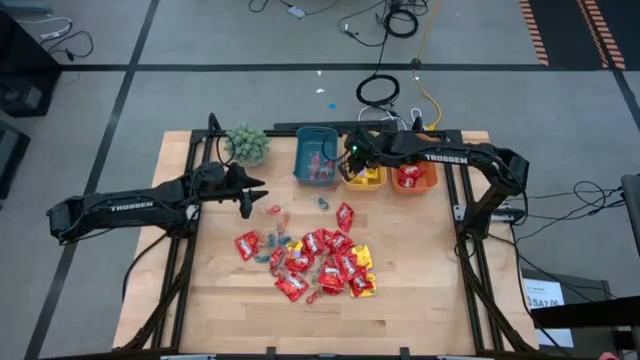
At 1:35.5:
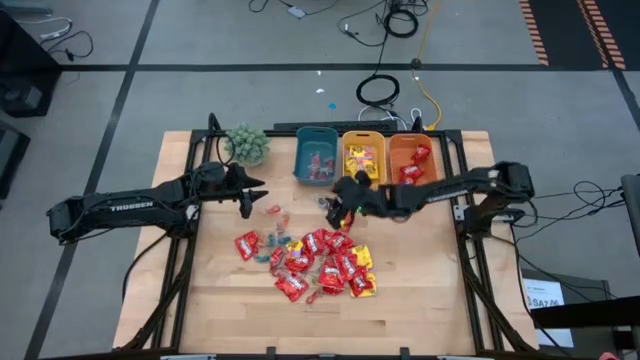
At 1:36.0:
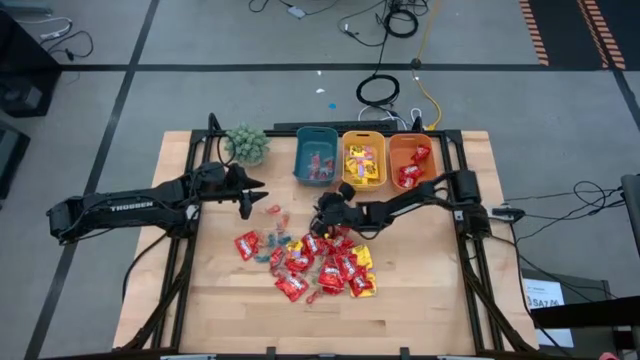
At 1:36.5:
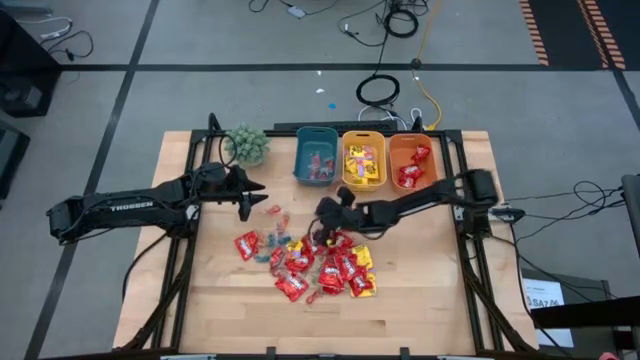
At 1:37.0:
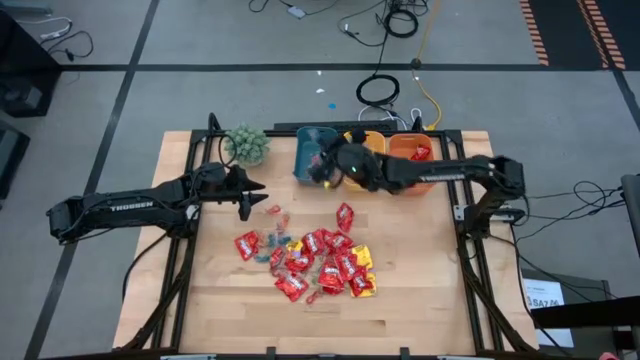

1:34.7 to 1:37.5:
Task: Sort candy
Put the blue gummy into the blue bin

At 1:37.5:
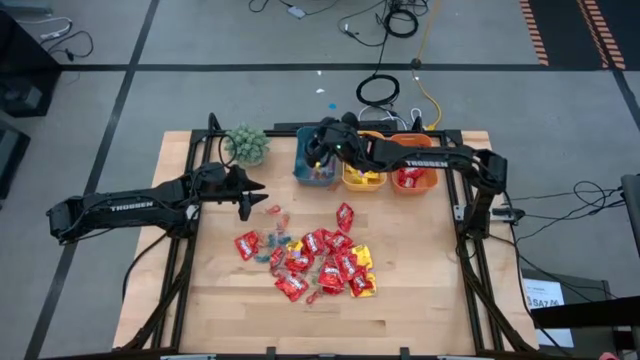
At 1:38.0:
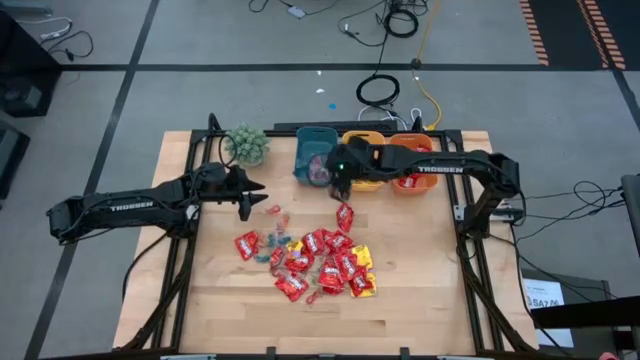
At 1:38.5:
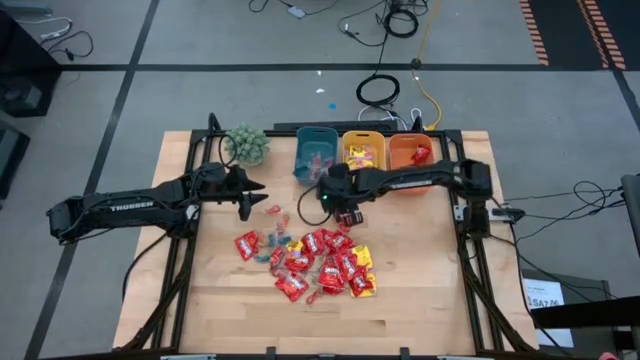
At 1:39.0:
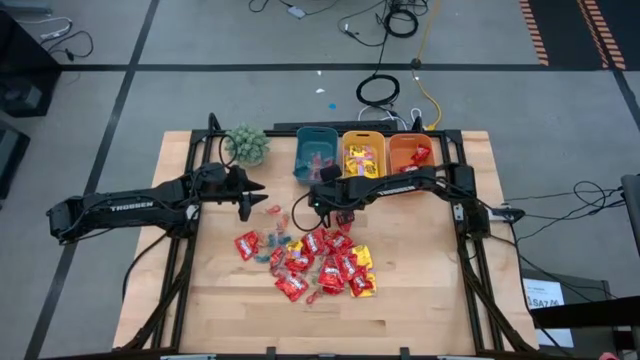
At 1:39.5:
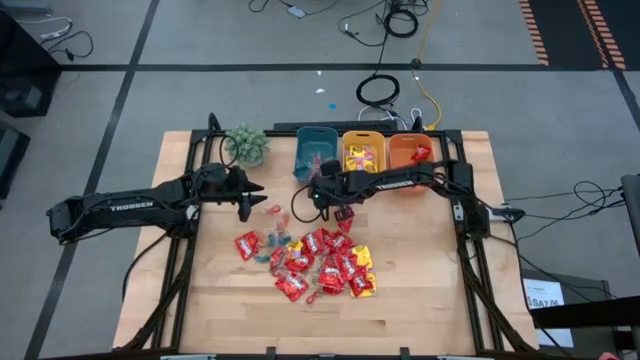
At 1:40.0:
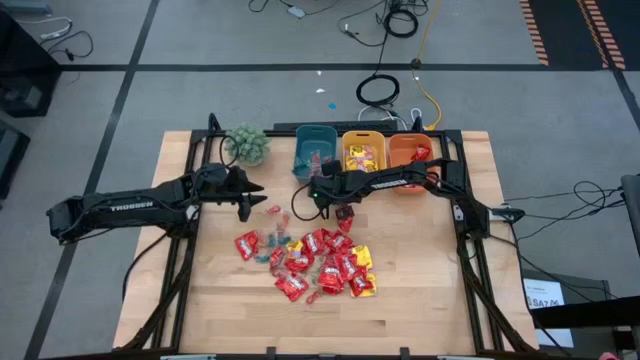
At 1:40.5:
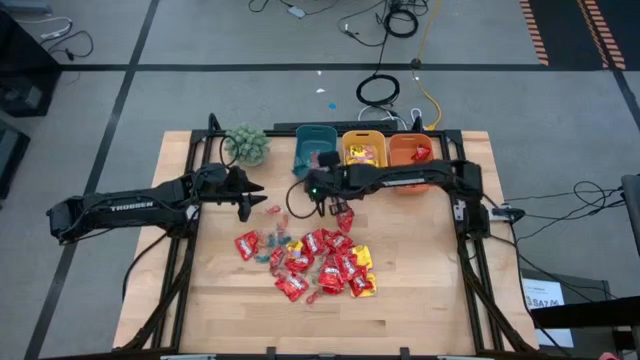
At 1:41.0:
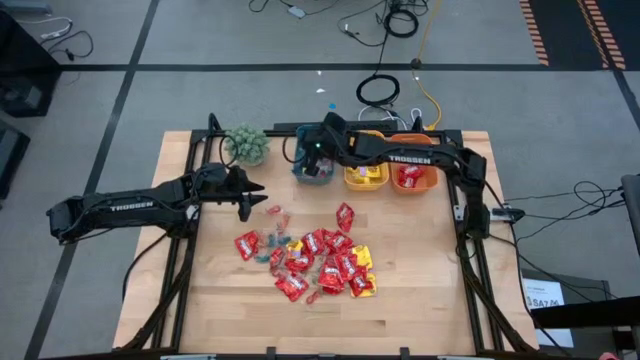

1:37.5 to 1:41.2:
Put the orange gummy into the blue bin

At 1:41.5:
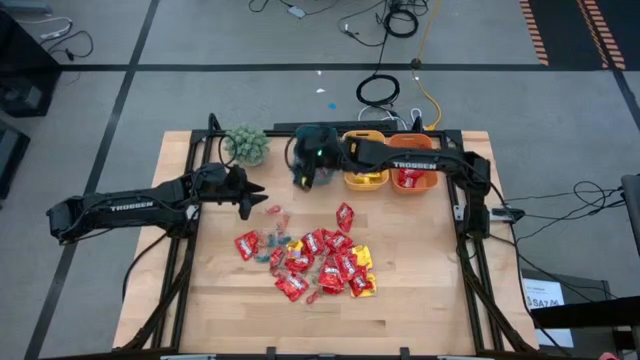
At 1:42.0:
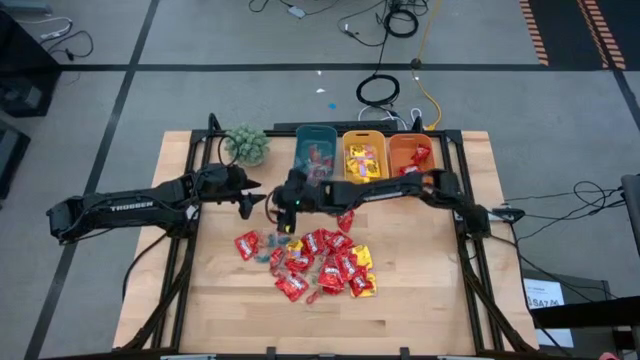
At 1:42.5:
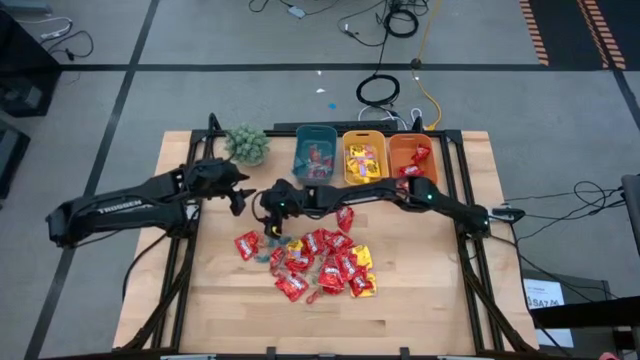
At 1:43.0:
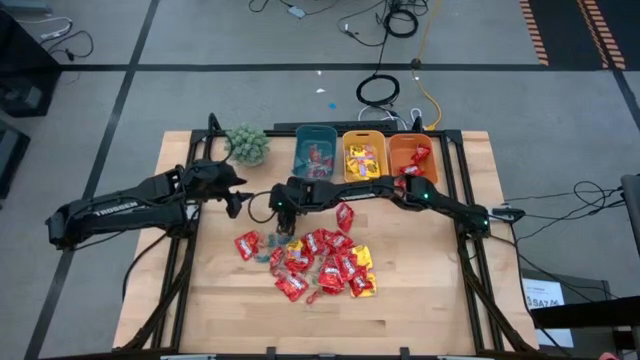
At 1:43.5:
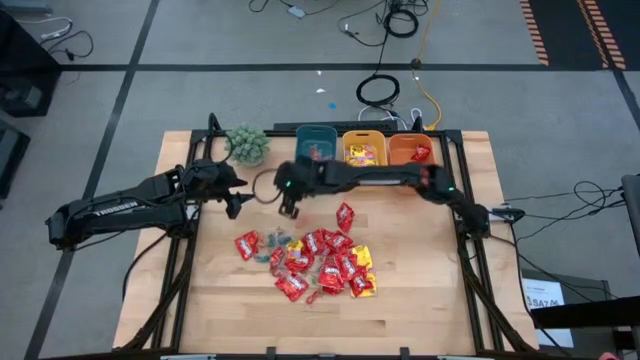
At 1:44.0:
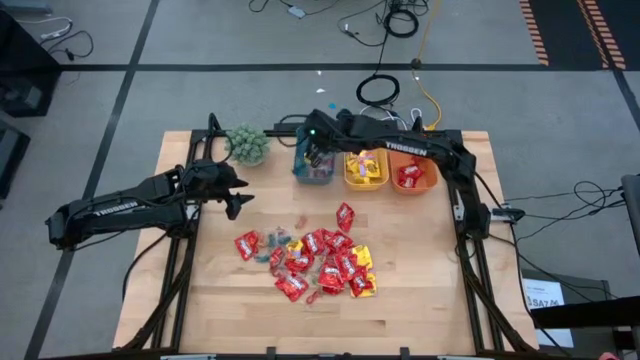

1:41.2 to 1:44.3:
Put the orange gummy into the blue bin

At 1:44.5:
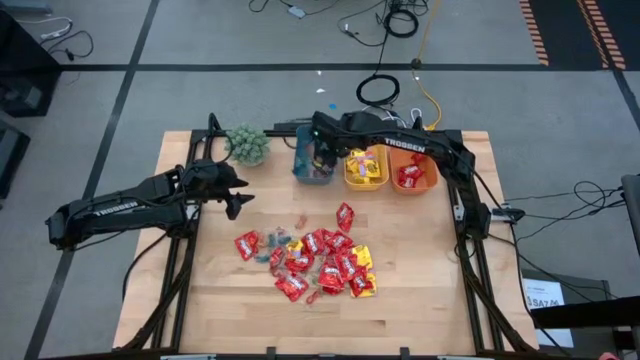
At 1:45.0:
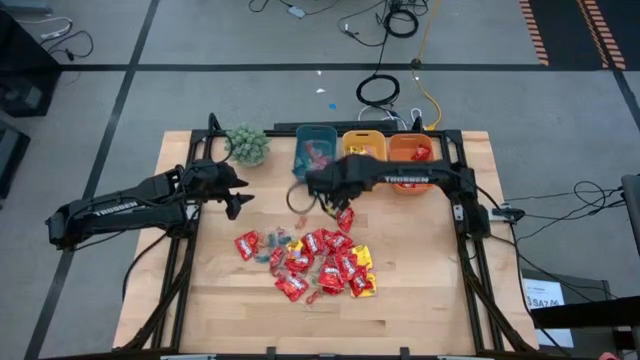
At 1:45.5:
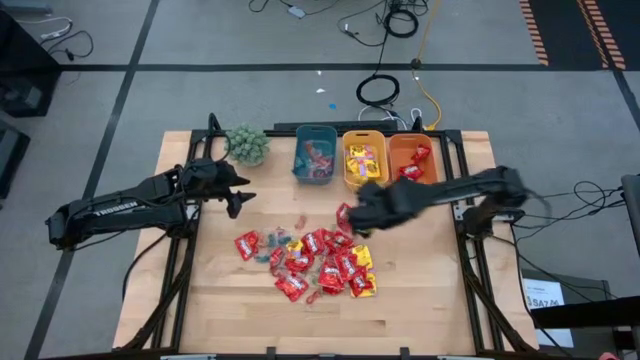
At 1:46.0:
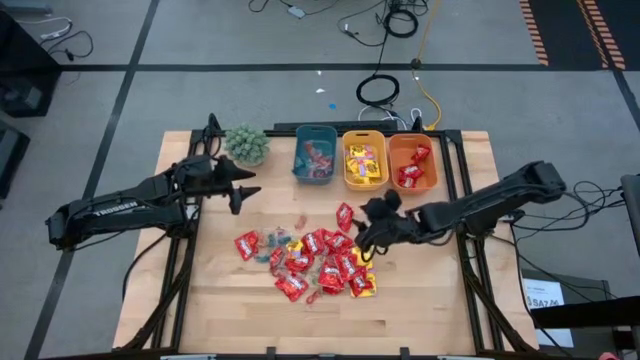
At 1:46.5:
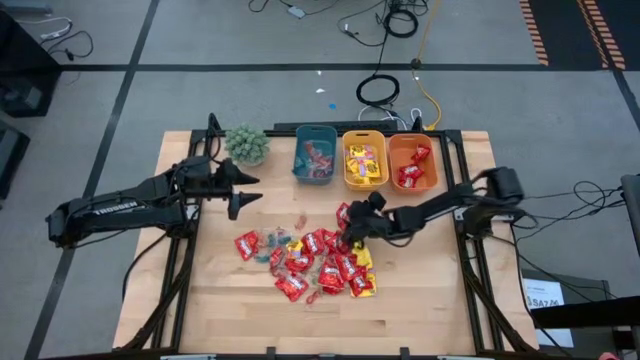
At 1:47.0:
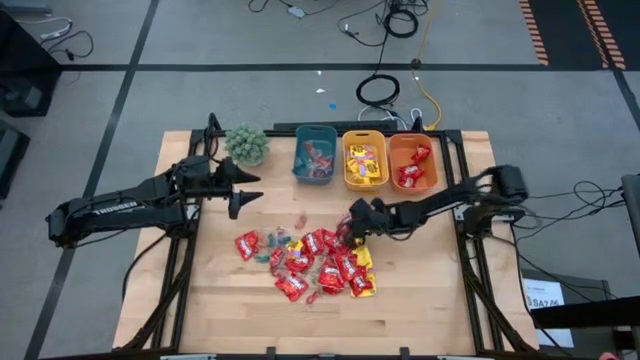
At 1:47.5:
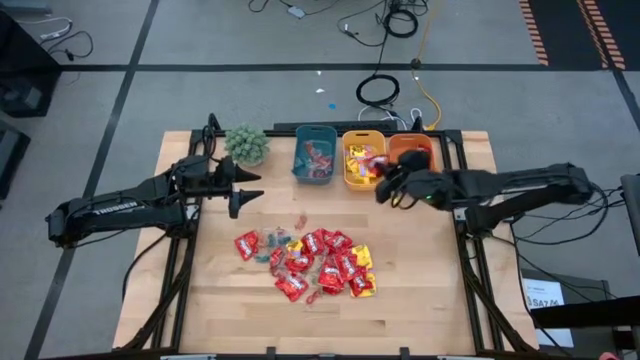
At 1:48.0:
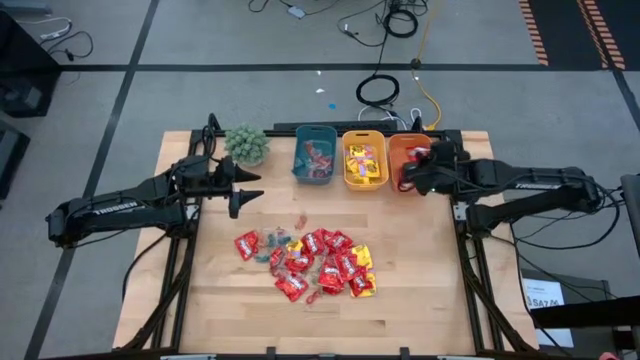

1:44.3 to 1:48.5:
Put the red candy into the orange bin

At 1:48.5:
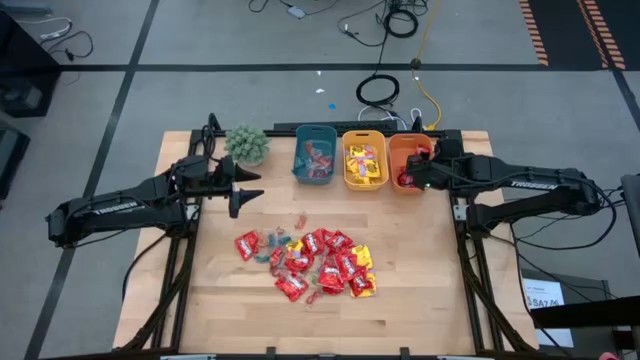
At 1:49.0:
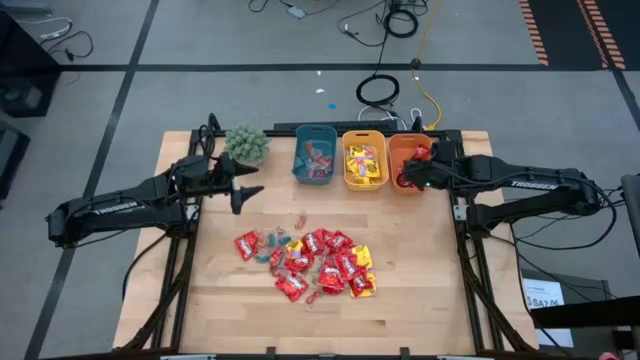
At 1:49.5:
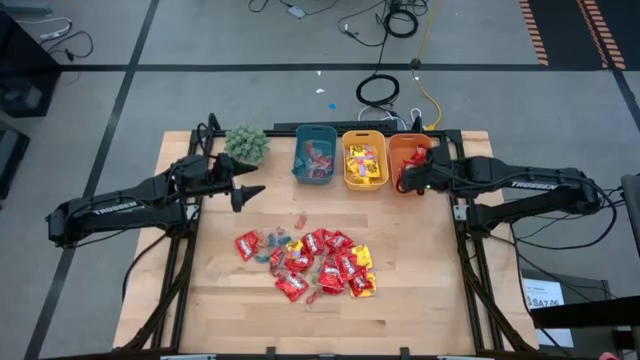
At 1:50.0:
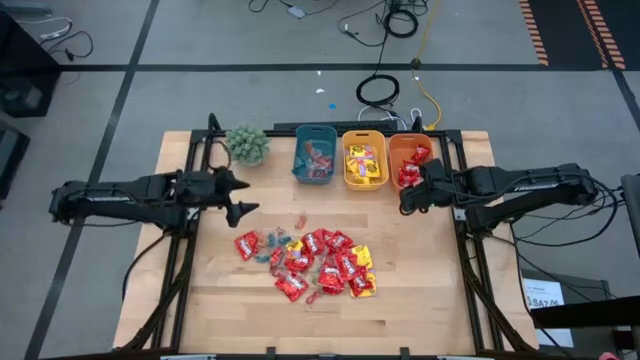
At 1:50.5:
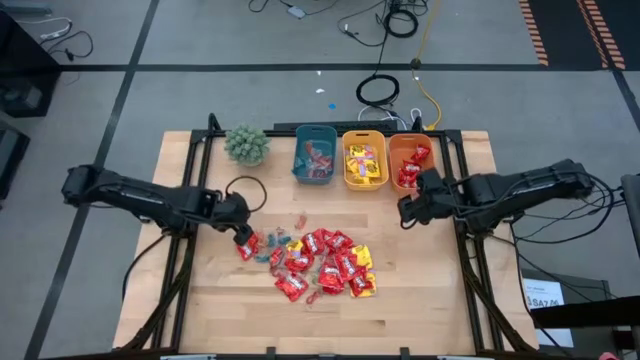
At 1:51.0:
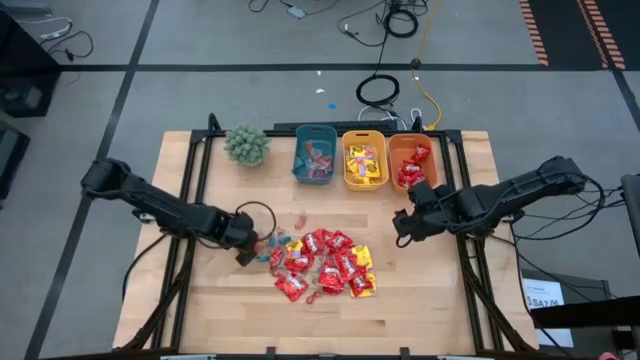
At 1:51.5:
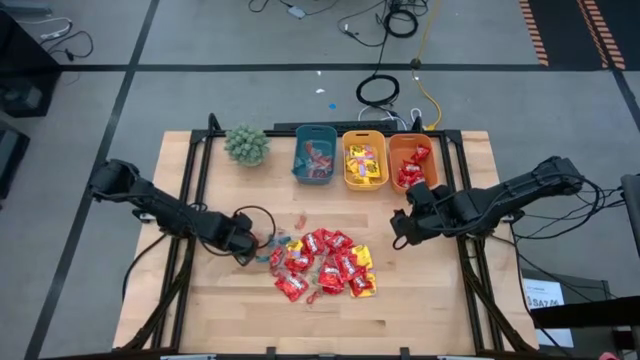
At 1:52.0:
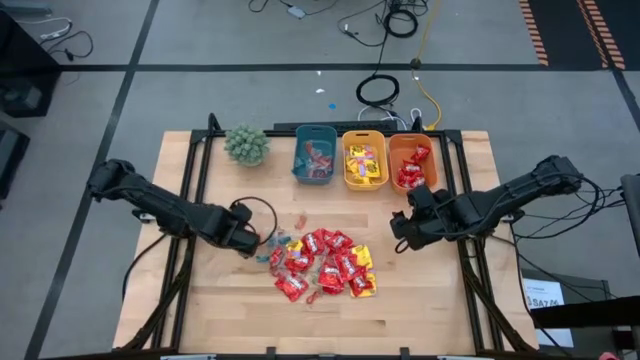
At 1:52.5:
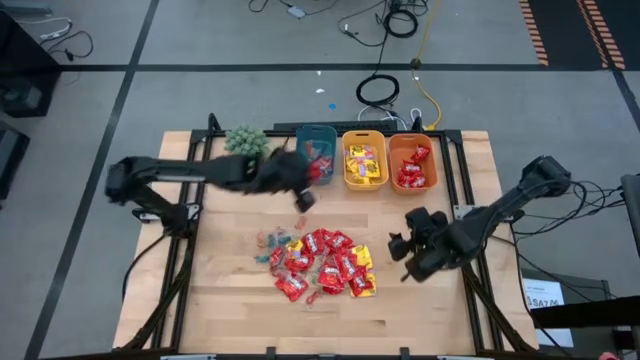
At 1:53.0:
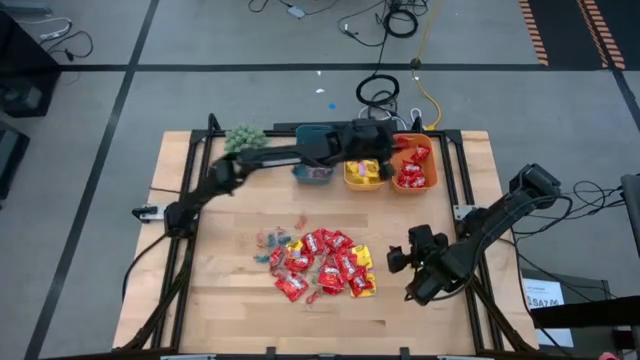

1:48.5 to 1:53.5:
Put the red candy into the orange bin

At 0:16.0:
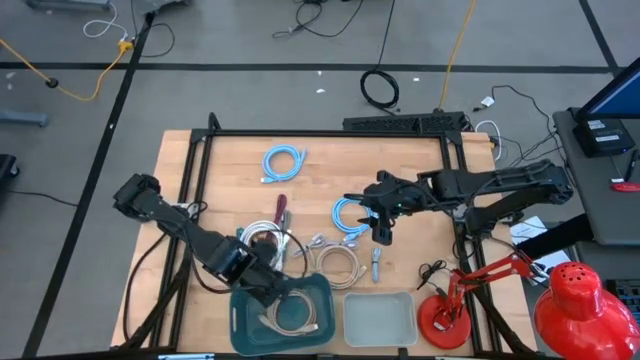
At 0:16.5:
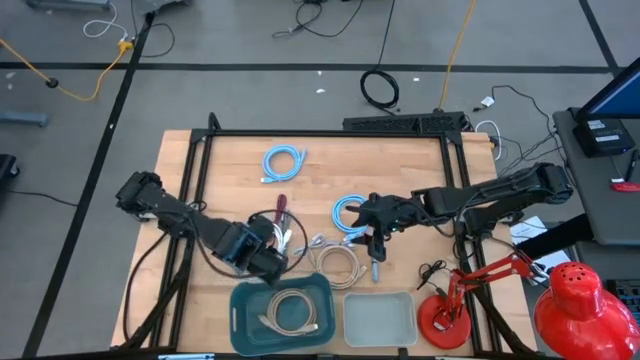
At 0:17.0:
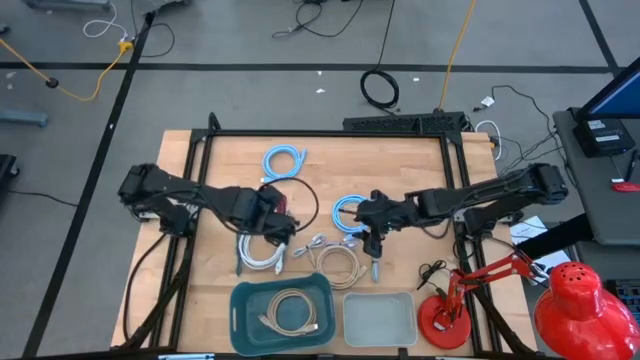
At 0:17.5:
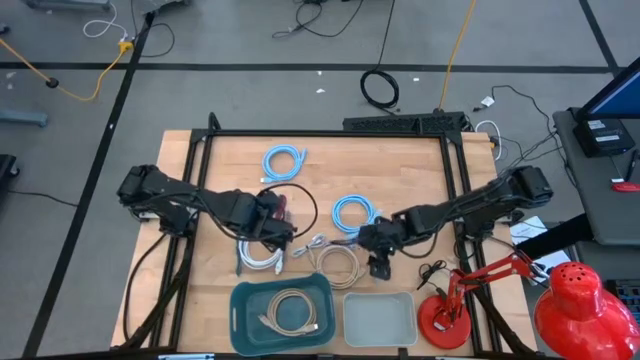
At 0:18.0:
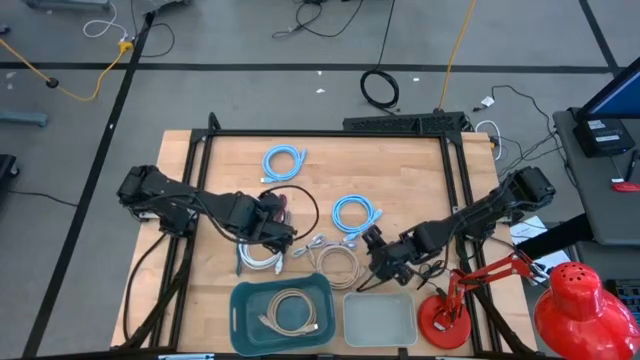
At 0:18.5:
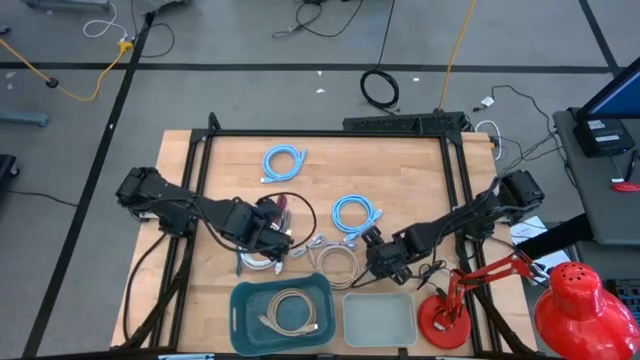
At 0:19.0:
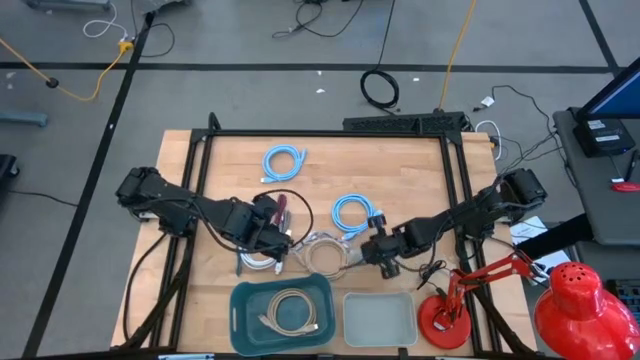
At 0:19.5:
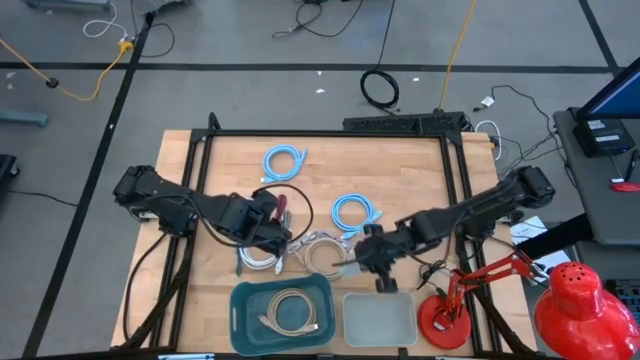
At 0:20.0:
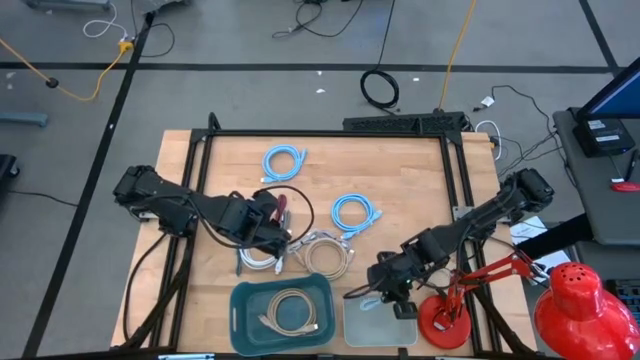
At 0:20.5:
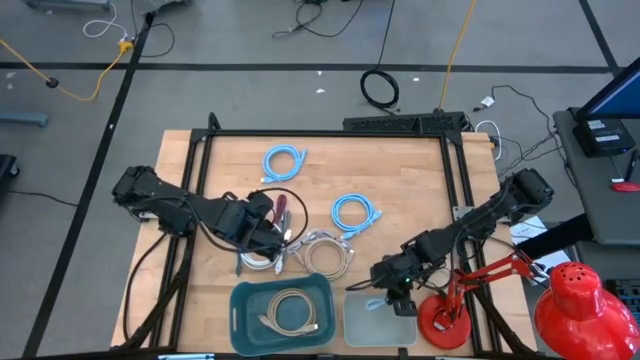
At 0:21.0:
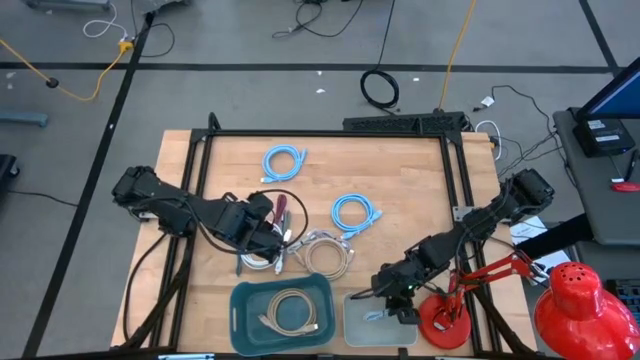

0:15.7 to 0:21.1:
Task: Pick & Place USB Port
Put the small light blue charger cable into the grey bin
